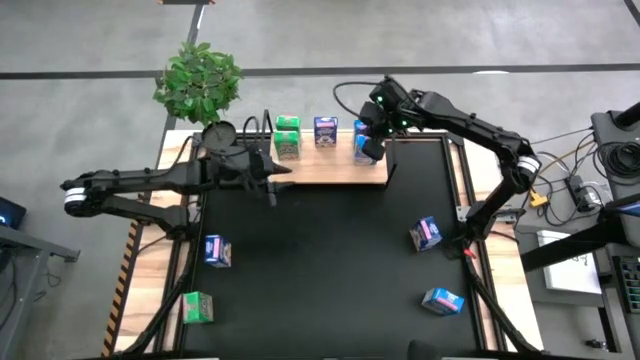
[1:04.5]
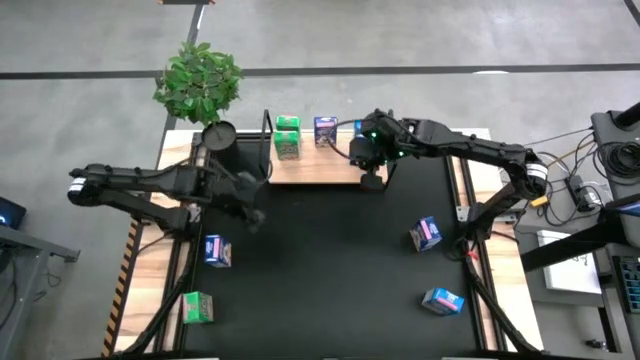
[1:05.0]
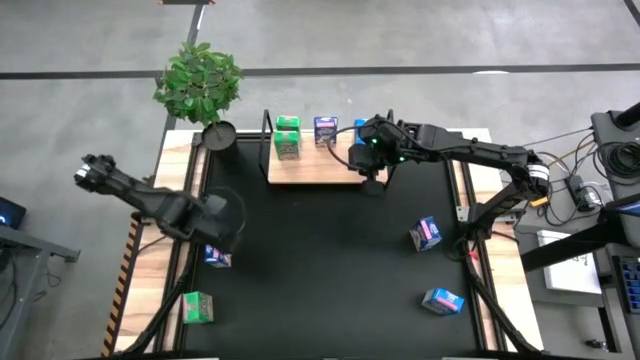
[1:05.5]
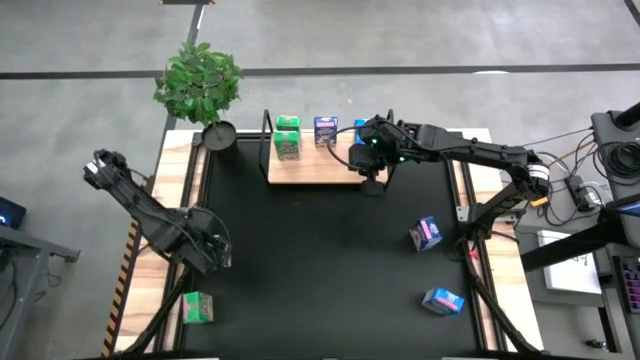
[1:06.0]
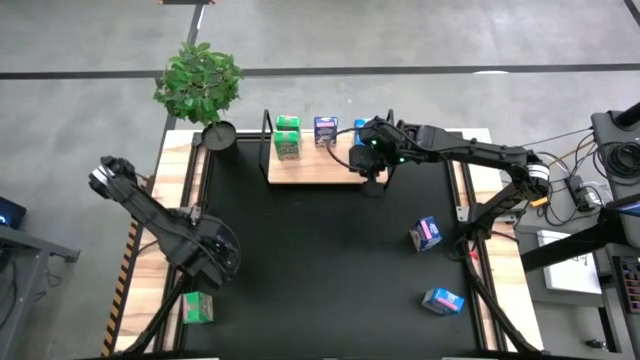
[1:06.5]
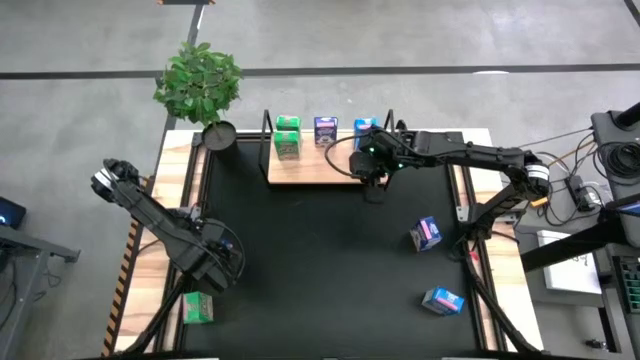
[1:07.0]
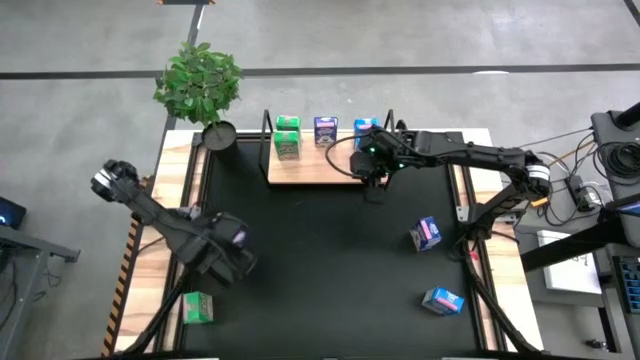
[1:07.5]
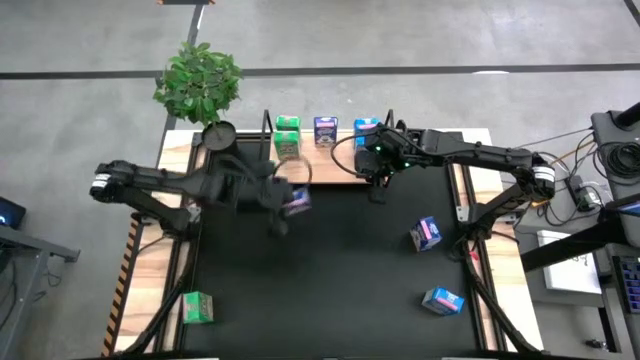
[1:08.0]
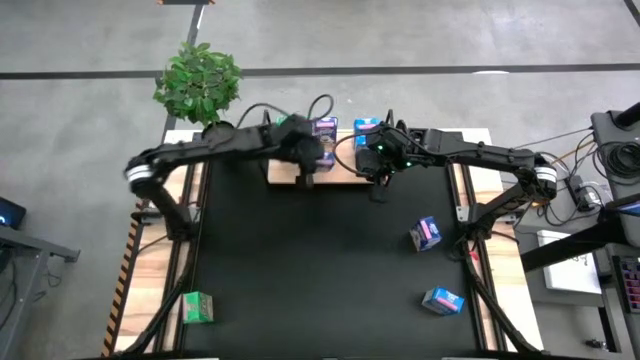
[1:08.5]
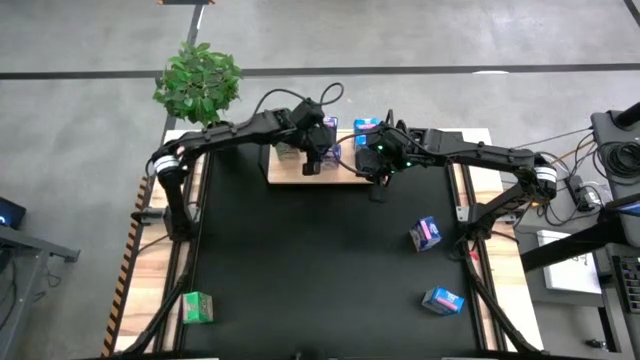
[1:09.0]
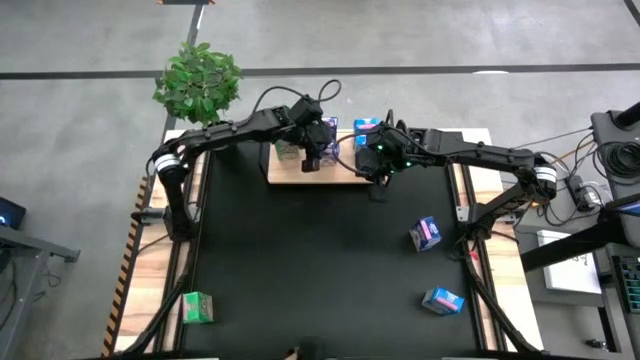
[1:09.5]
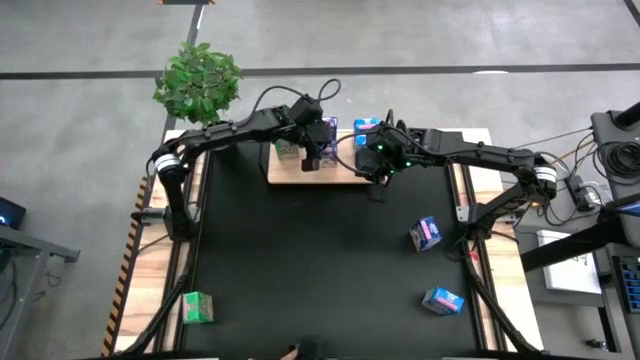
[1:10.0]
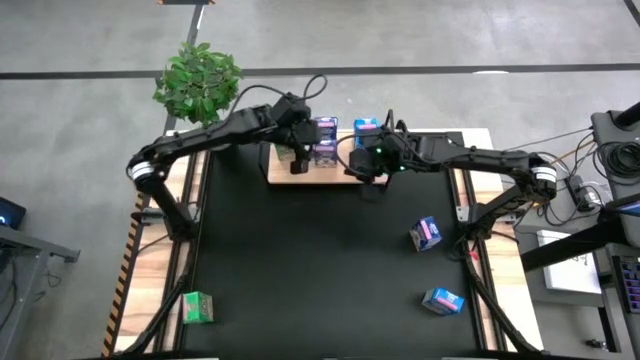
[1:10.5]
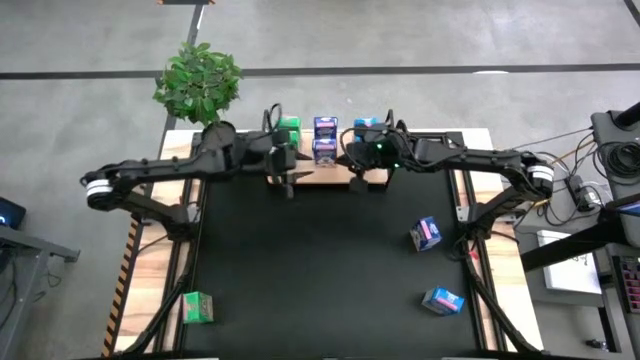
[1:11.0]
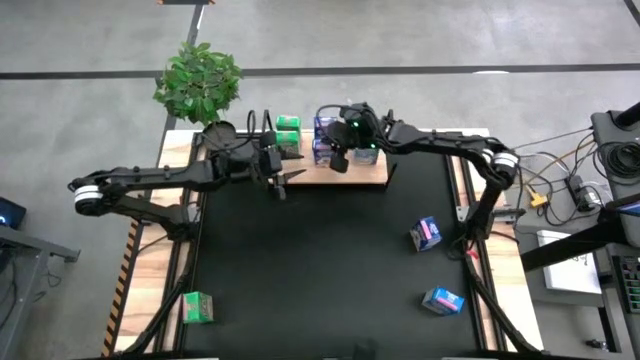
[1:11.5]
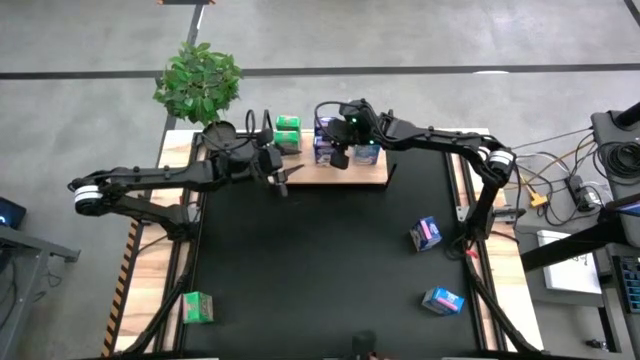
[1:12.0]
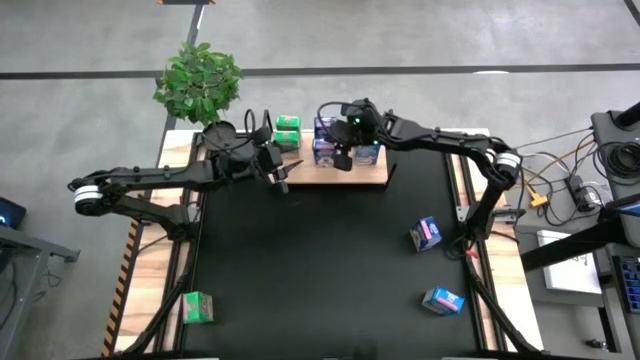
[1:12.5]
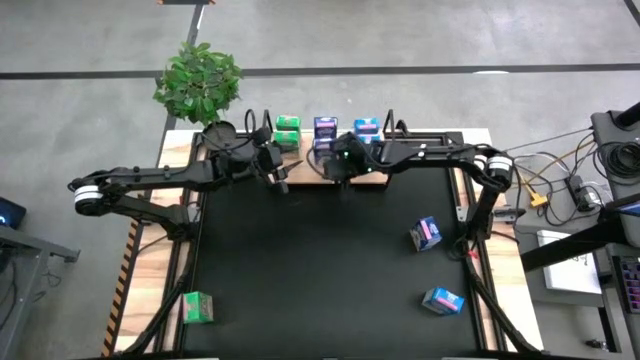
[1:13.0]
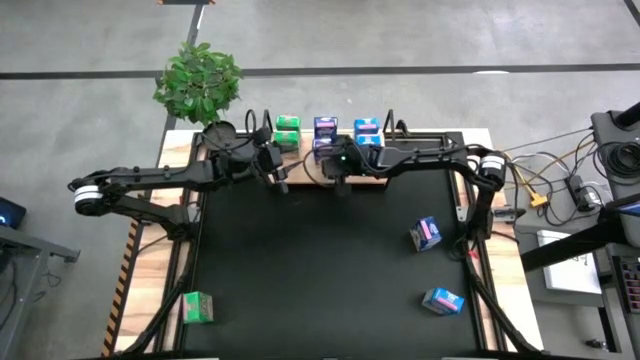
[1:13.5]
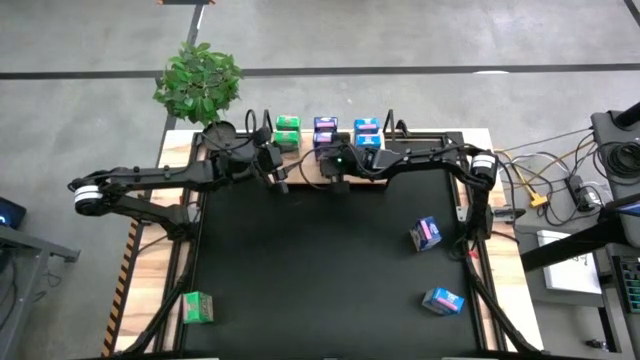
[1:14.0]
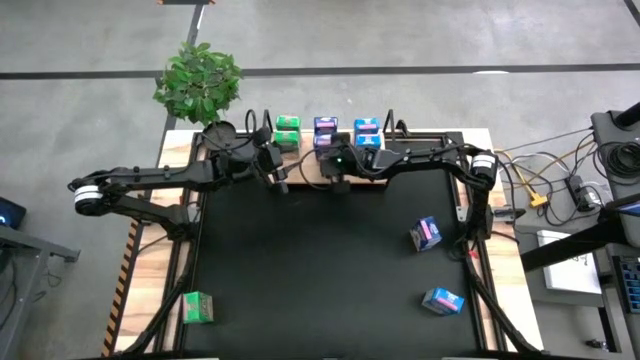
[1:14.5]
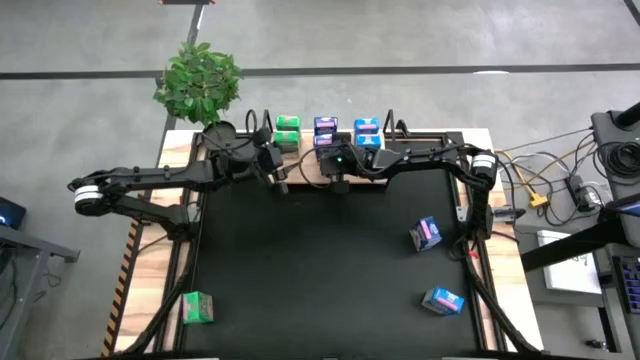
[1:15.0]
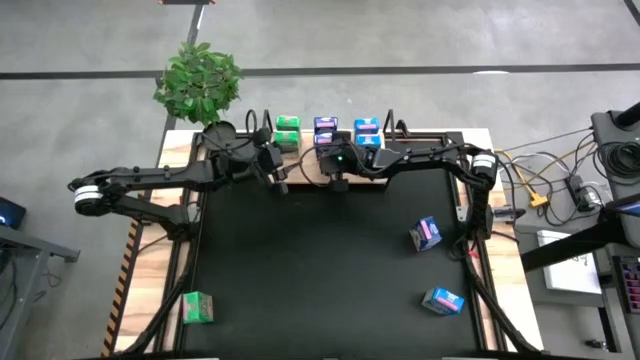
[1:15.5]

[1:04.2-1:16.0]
Task: Stack cereal on shelf
Put the left blue cereal box aligned with the other blue cereal box on the shelf

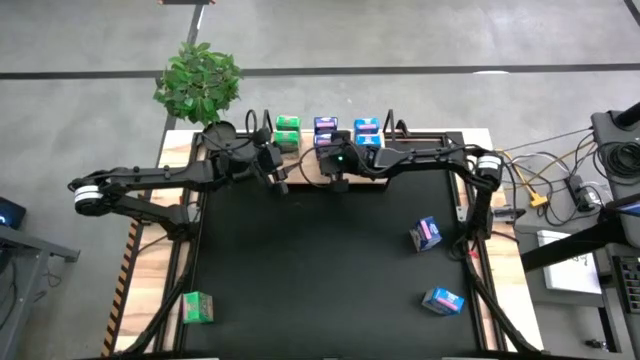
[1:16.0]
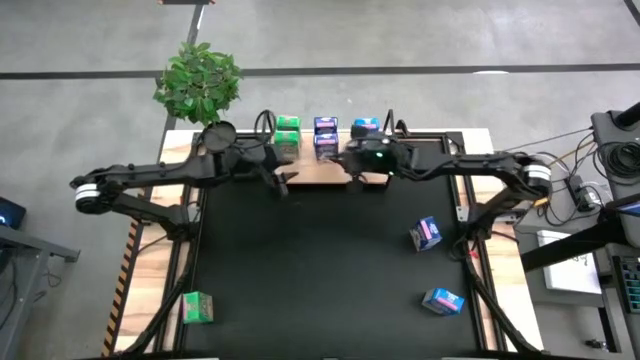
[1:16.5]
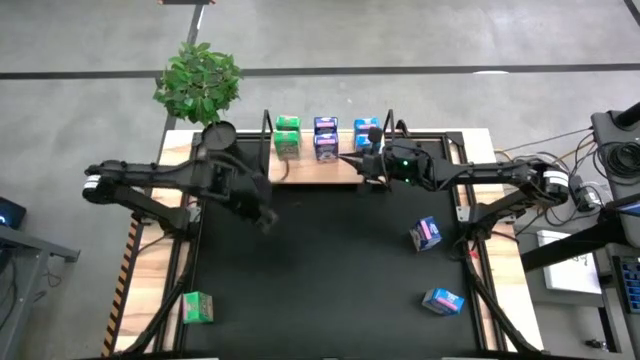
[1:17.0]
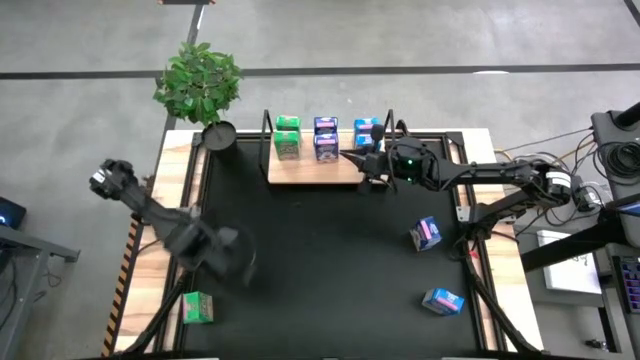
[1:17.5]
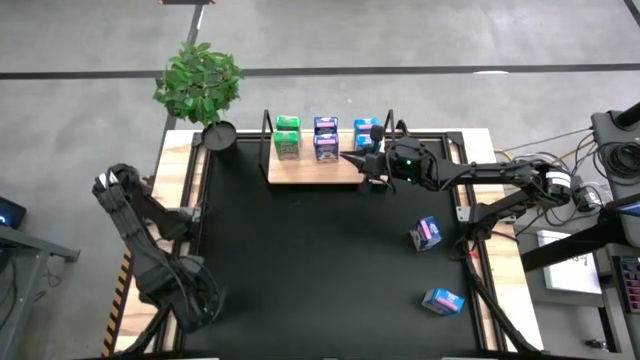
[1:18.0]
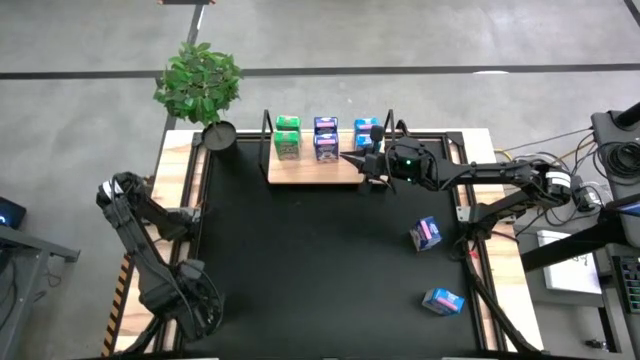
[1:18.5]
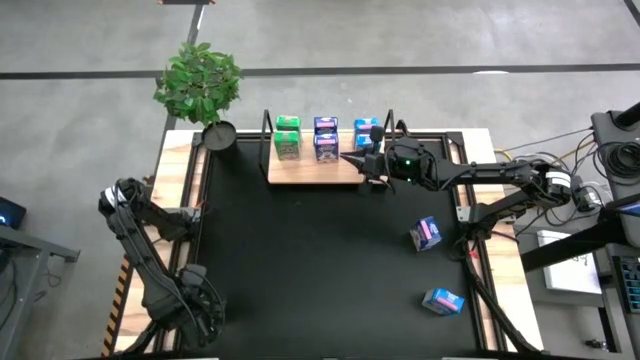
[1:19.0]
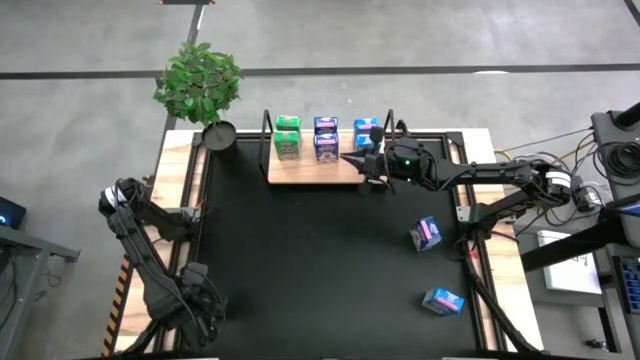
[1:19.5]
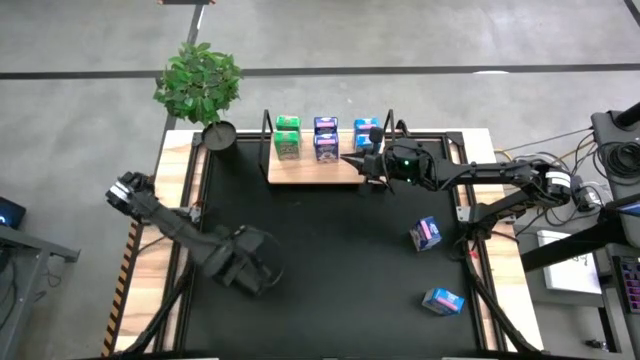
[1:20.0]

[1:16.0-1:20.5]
Put the green cereal box aligned with the other green cereal boxes on the shelf

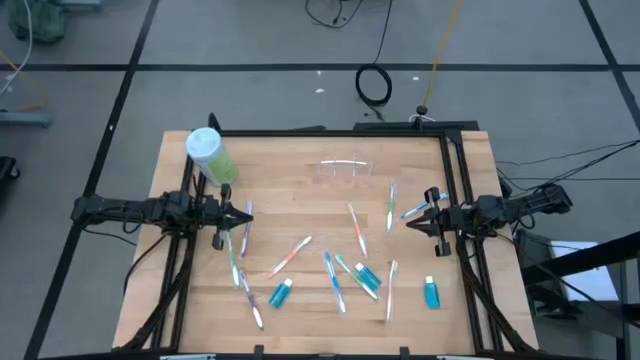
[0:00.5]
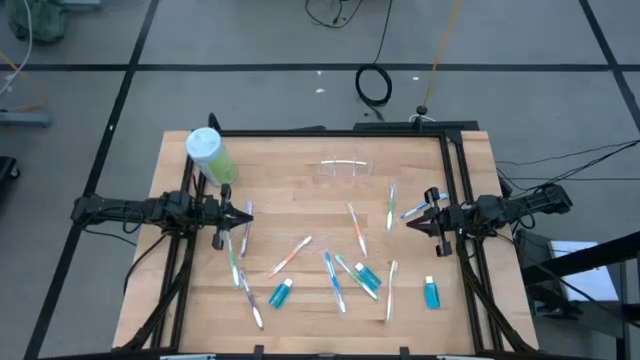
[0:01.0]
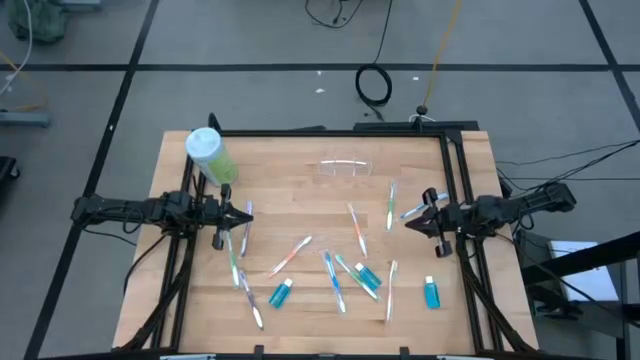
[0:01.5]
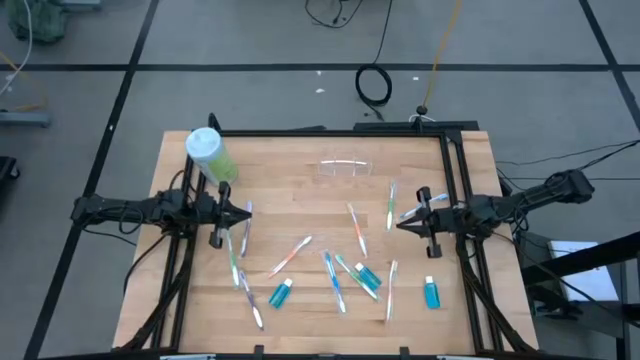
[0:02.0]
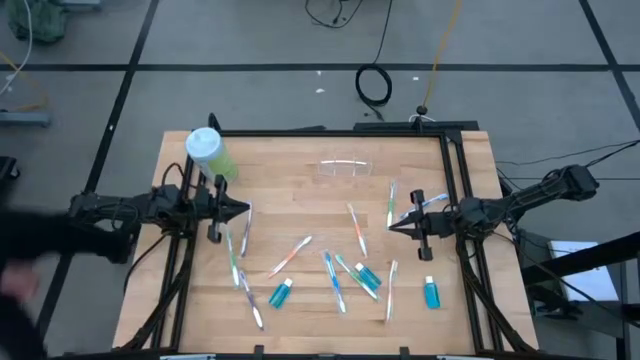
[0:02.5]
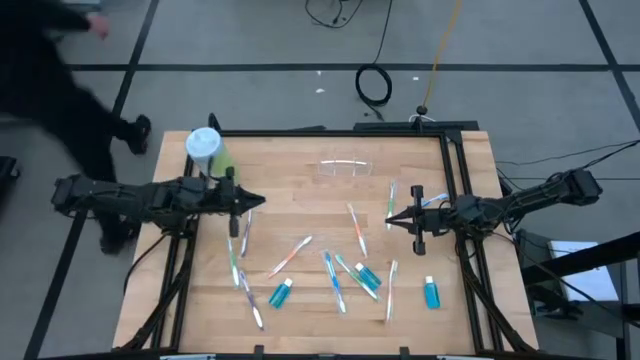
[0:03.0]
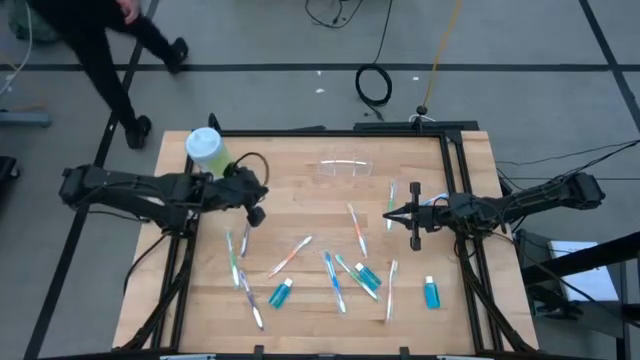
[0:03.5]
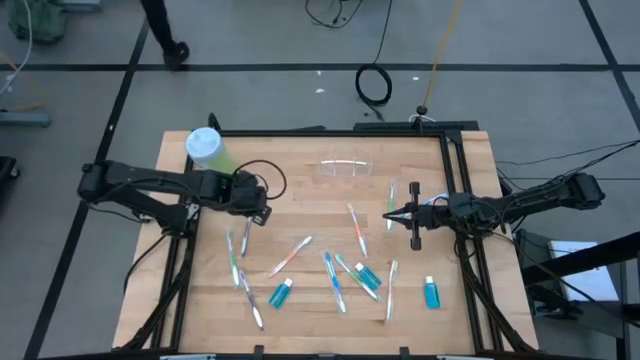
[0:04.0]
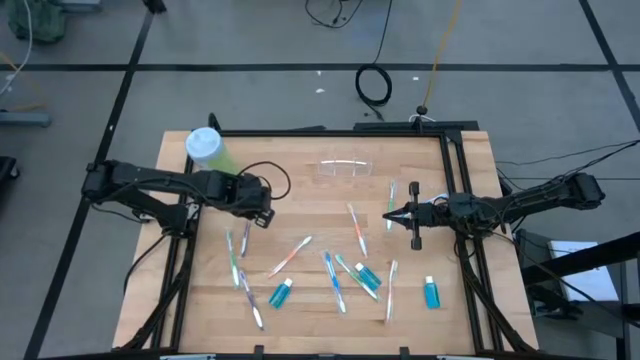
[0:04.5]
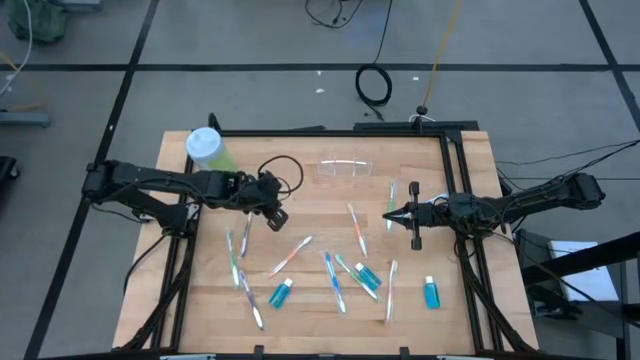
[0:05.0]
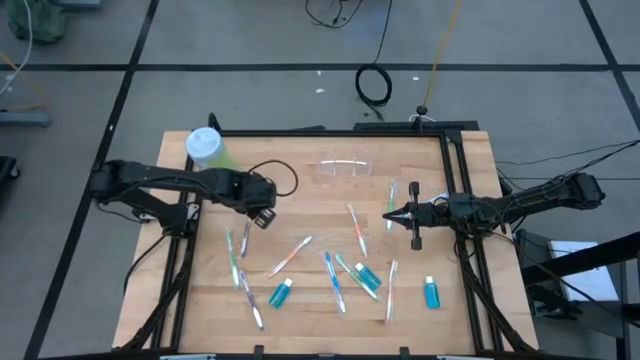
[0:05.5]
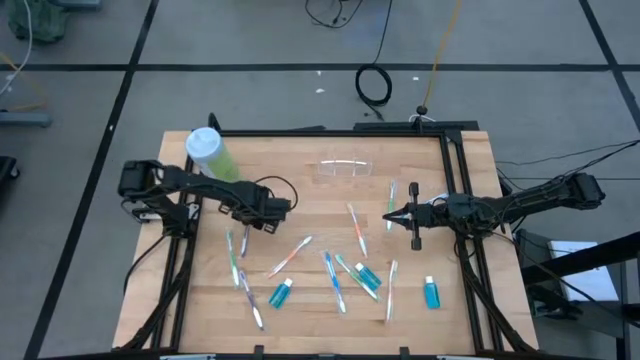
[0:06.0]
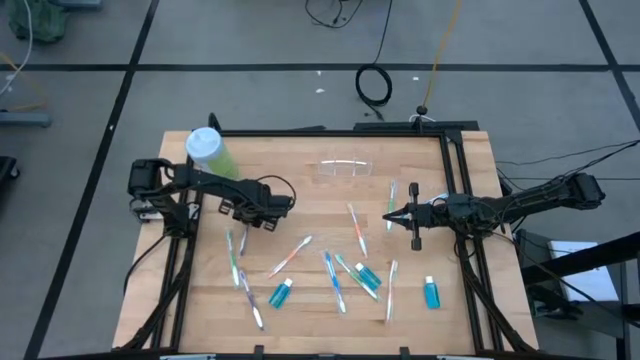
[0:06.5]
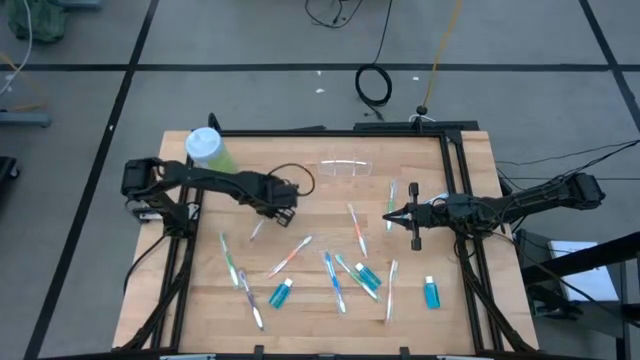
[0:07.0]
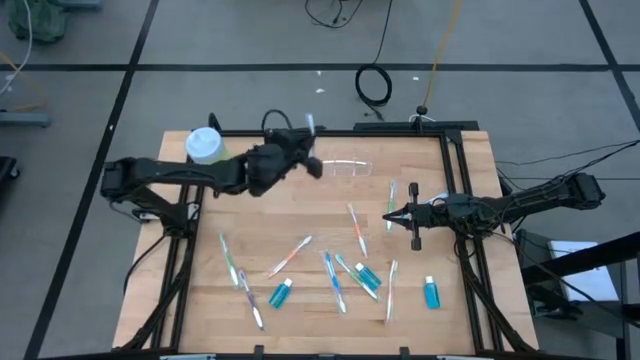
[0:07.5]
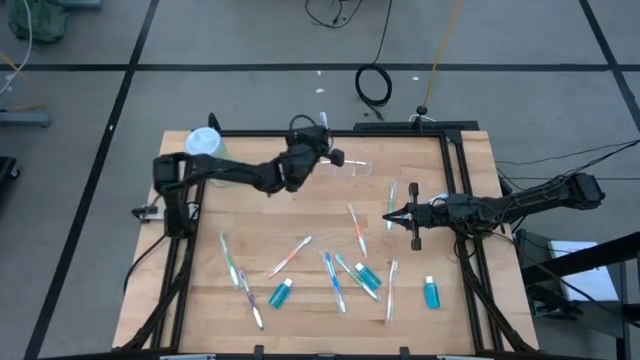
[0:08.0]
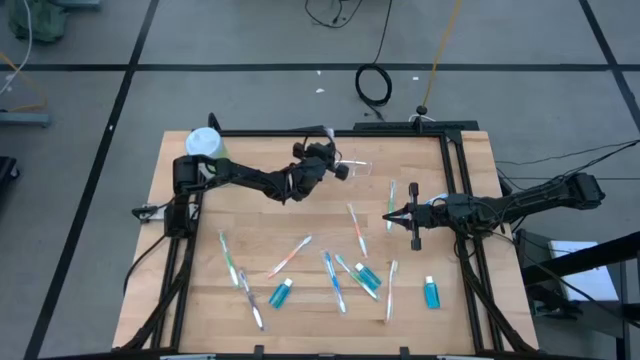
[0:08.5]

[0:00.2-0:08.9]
Task: Pick & Place toothbrushing station
Put the top violet toothbrush into the transparent organizer
